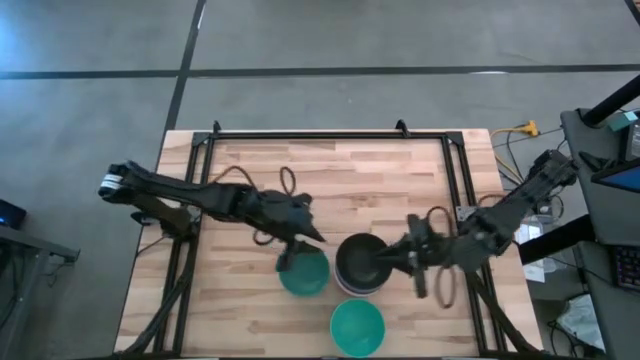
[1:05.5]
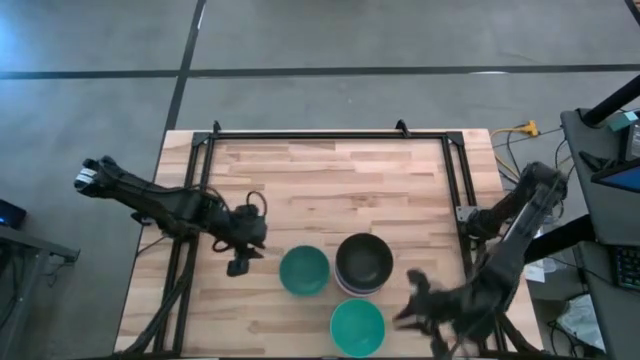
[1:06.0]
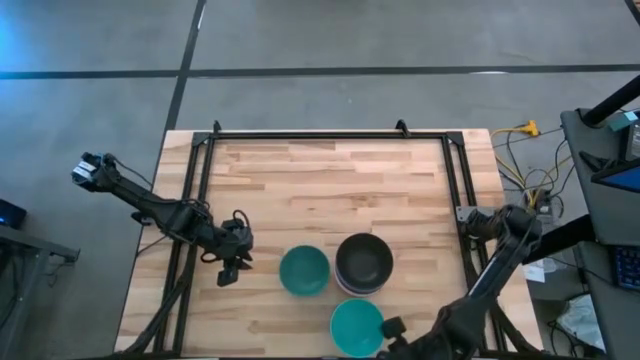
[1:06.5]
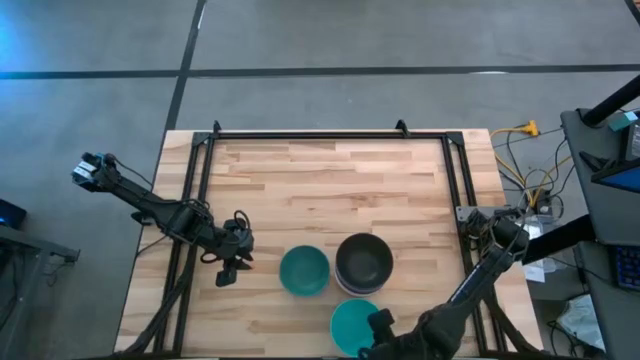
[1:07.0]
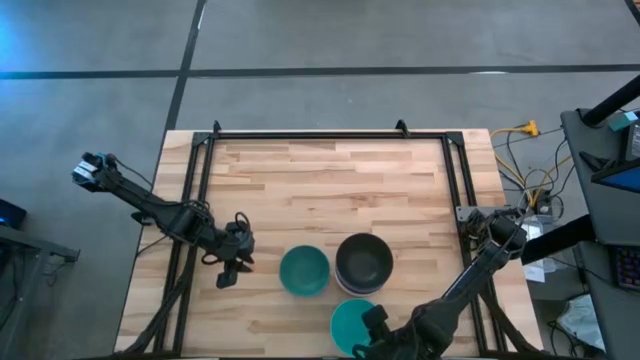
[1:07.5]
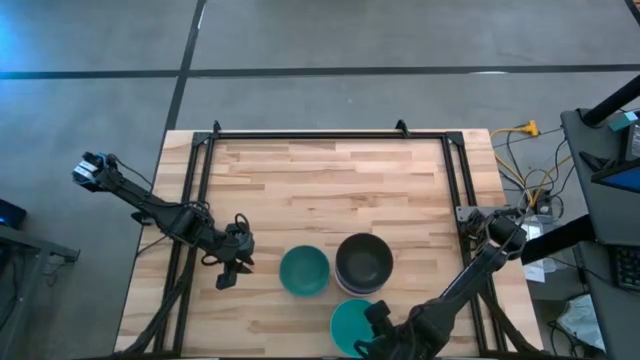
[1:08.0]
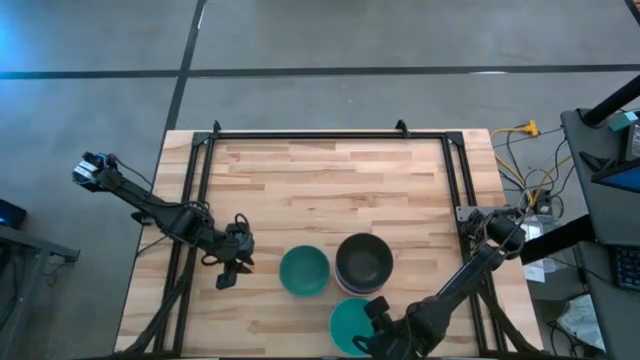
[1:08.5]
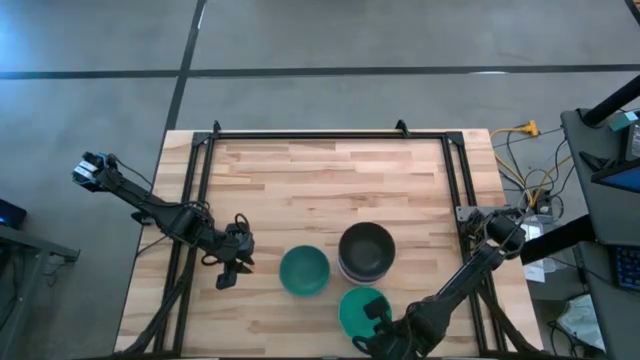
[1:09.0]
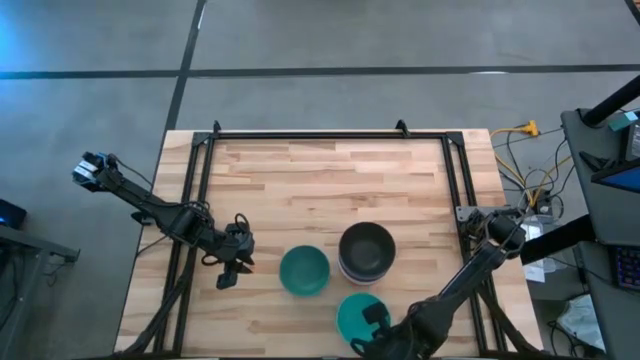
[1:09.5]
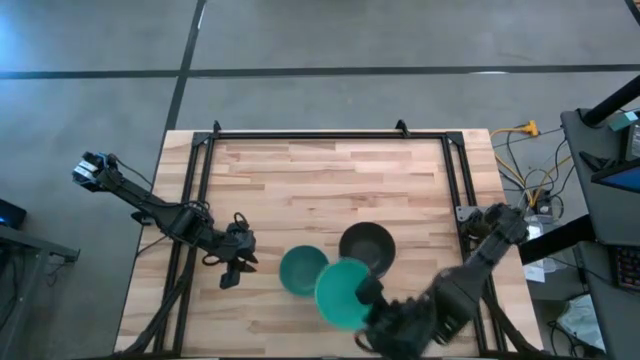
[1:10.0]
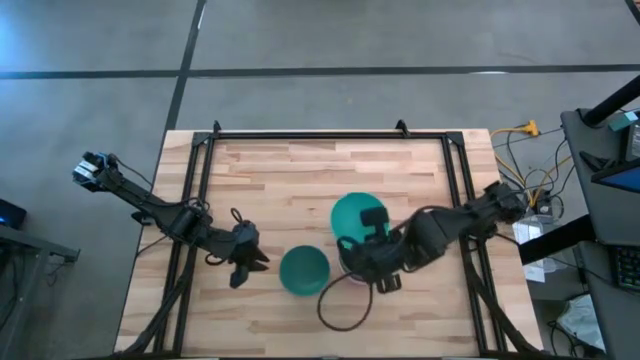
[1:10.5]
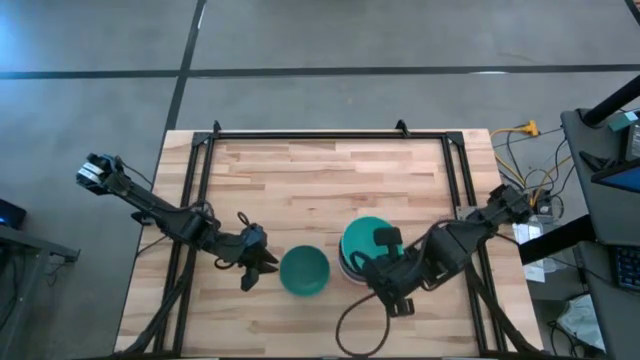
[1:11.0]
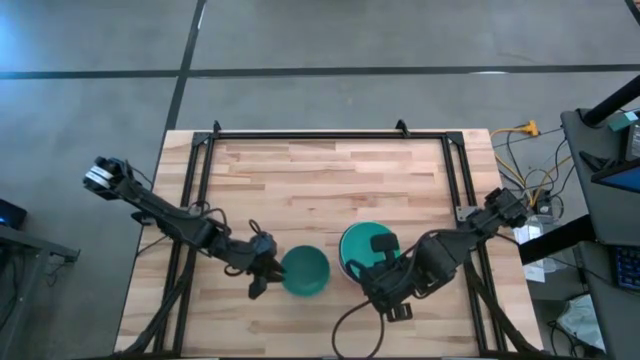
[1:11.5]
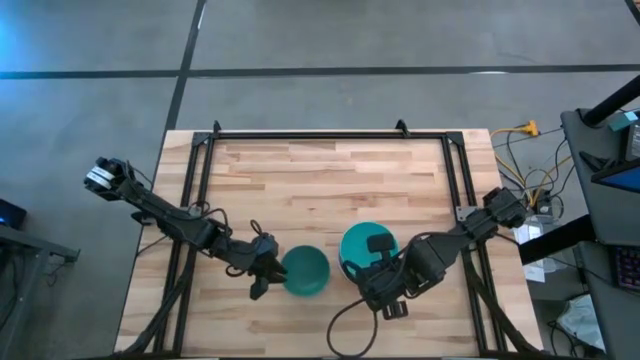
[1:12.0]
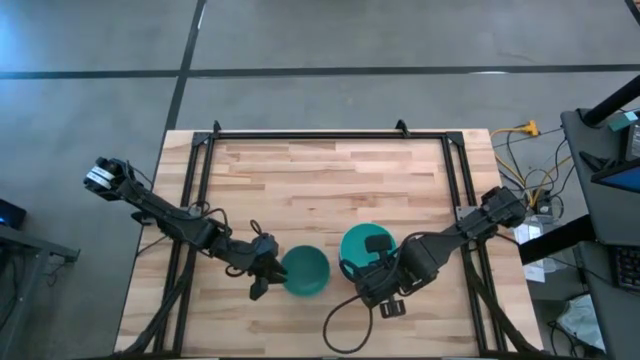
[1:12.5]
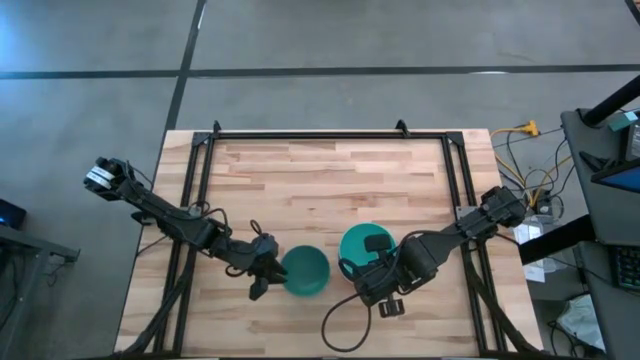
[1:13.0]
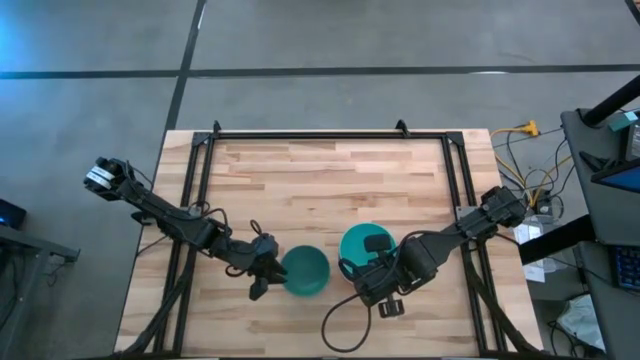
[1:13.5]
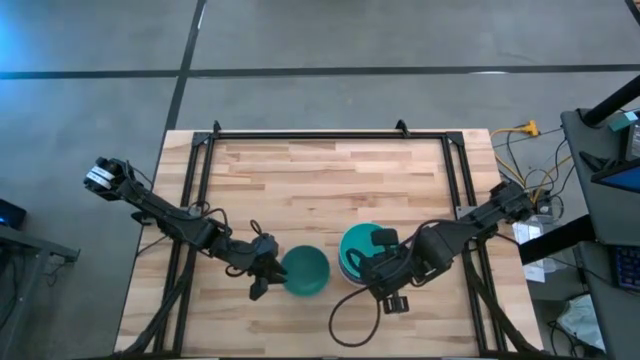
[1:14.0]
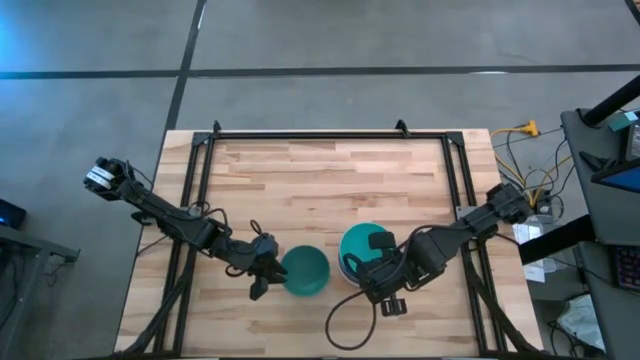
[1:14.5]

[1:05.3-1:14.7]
Task: Nest bowls inside each other
Stack the light blue bowl on top of the black bowl

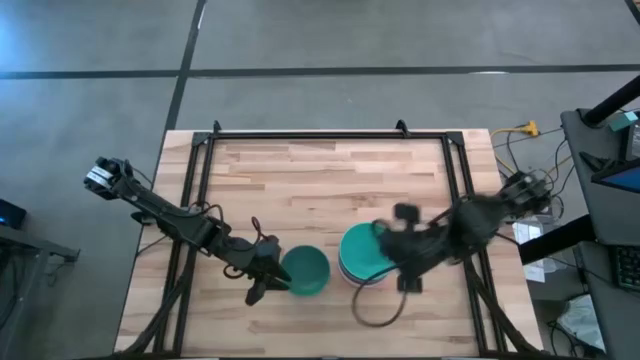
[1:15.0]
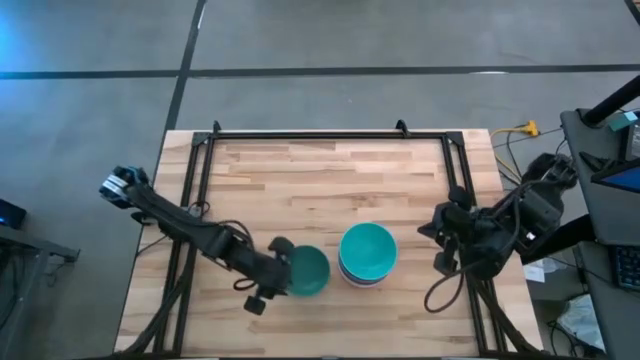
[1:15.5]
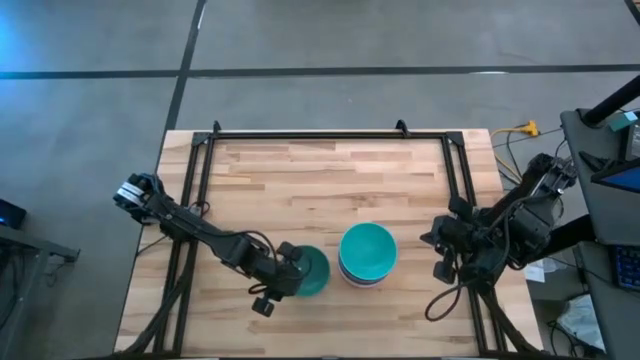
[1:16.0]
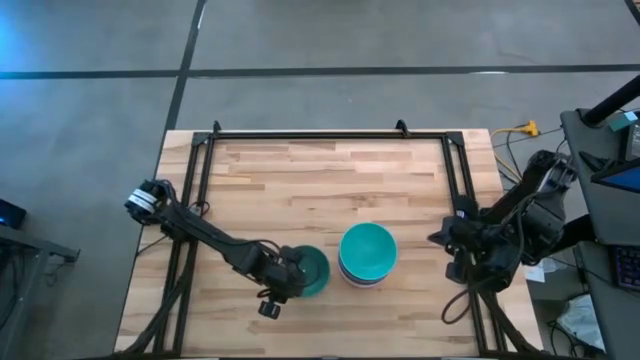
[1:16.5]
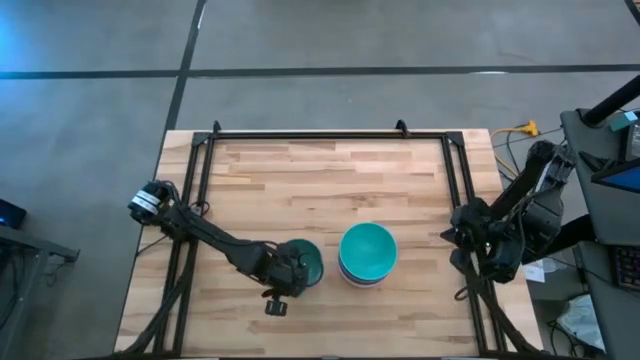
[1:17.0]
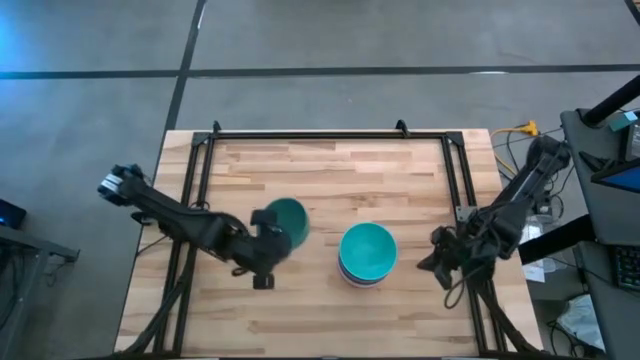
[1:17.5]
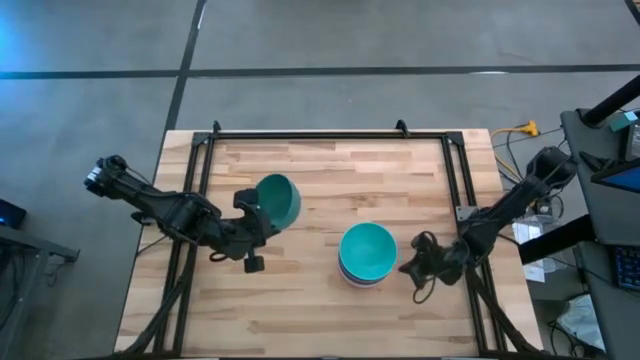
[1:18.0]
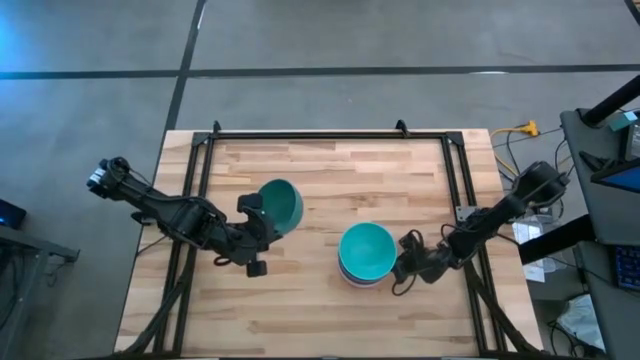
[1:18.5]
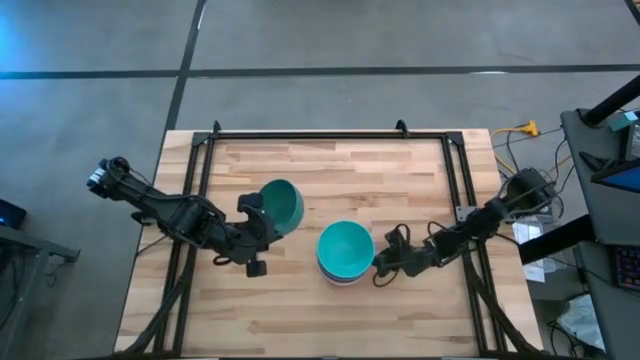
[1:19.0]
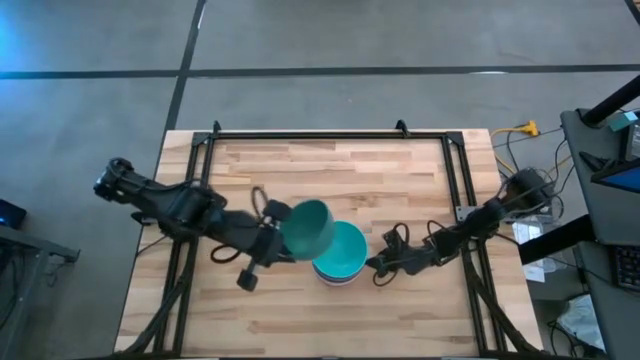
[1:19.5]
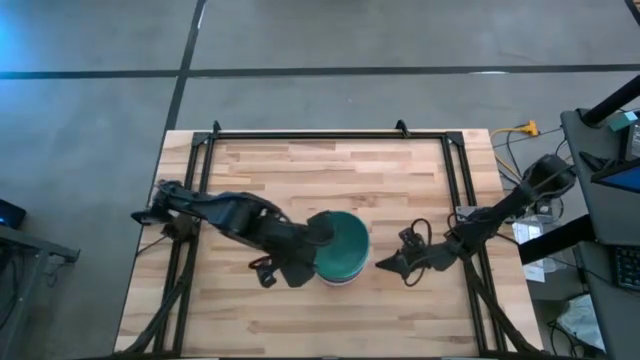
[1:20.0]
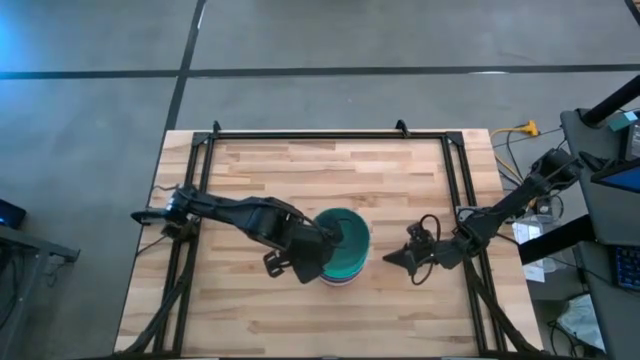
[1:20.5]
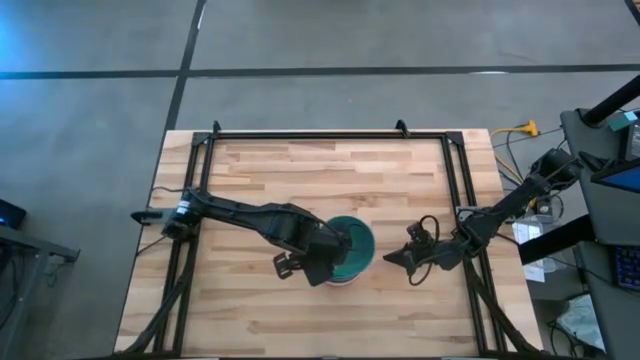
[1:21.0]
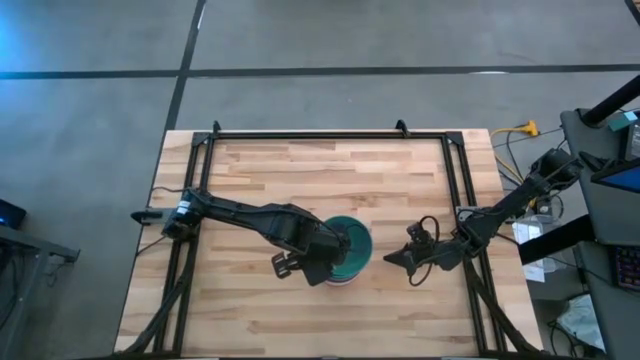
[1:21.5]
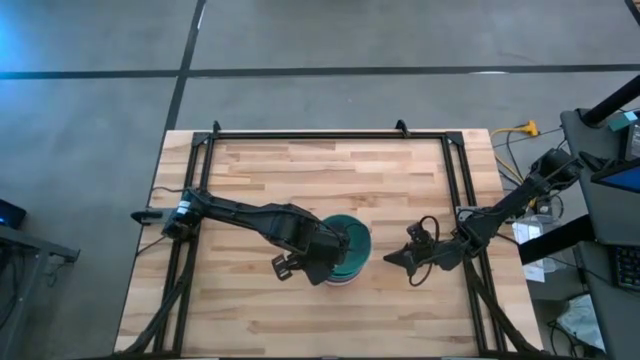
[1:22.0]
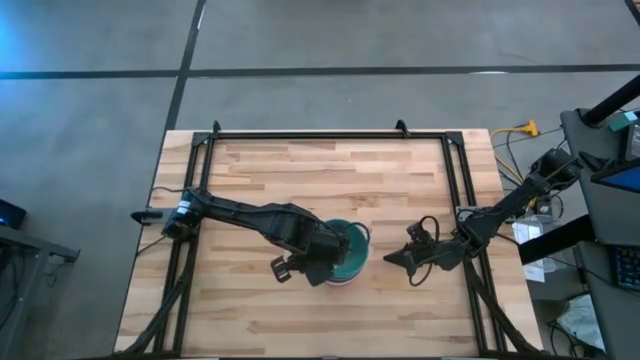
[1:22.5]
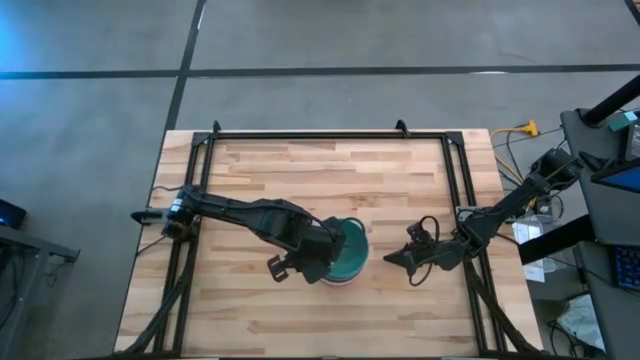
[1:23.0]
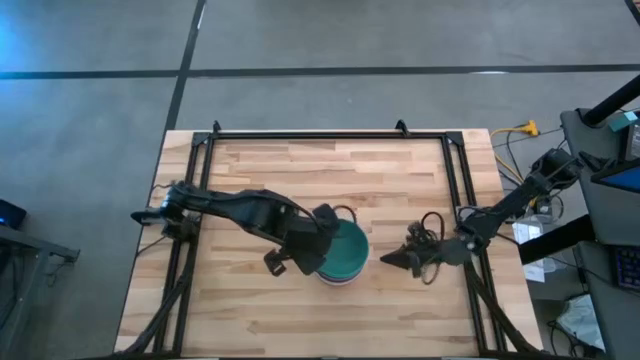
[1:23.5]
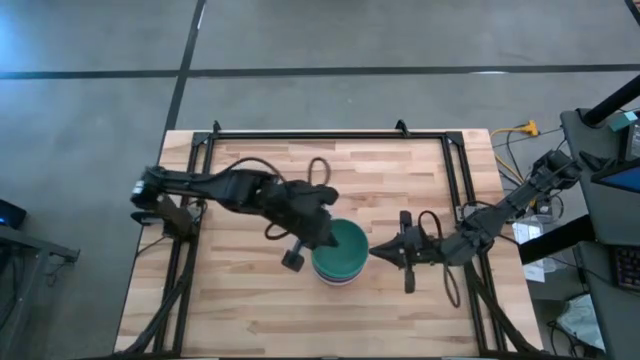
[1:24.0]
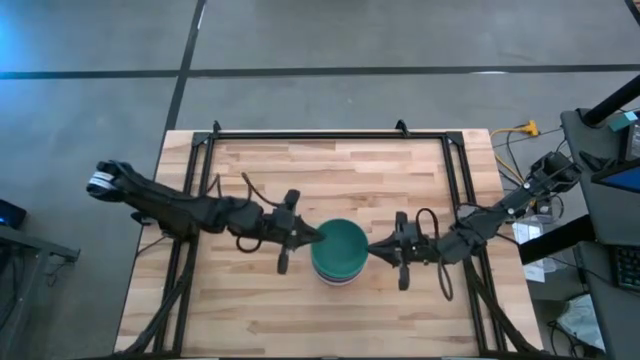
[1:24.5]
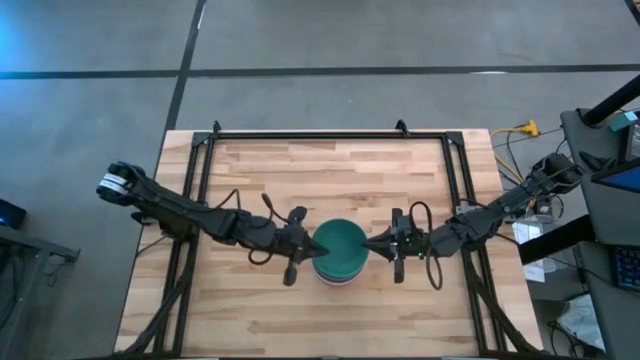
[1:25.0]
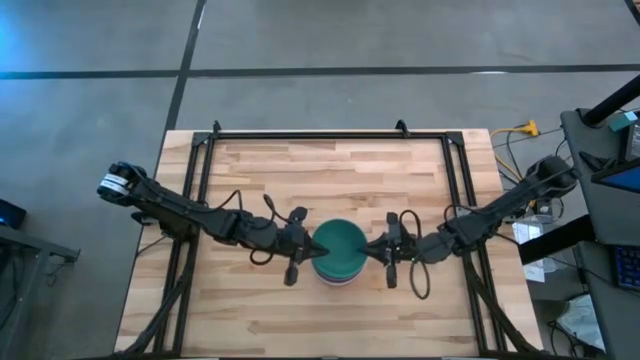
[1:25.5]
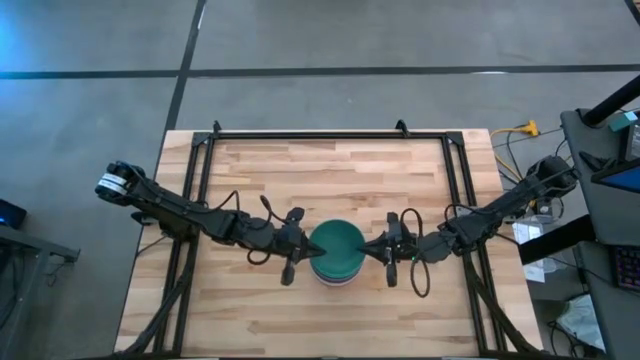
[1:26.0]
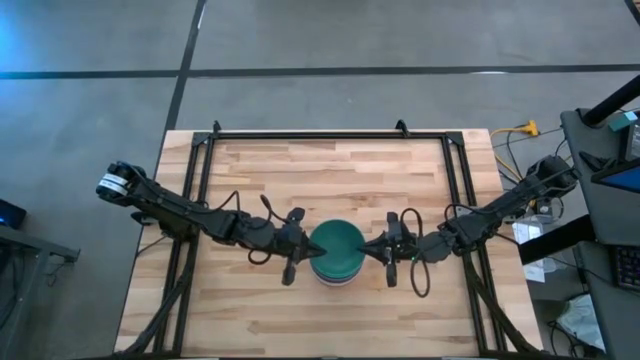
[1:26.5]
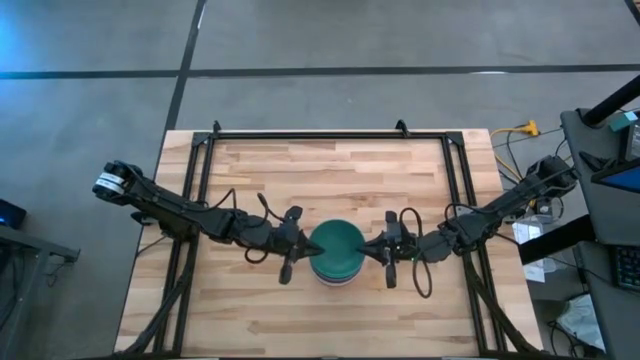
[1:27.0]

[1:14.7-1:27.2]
Stack the green bowl on top of the light blue bowl
